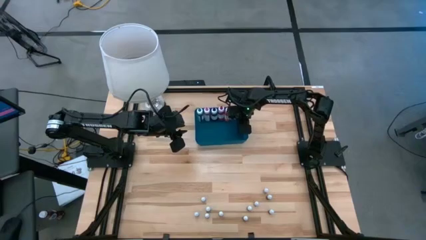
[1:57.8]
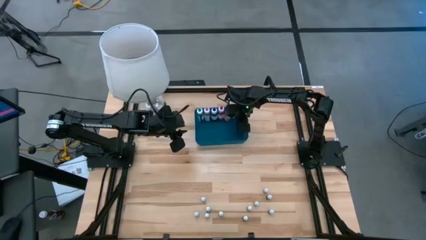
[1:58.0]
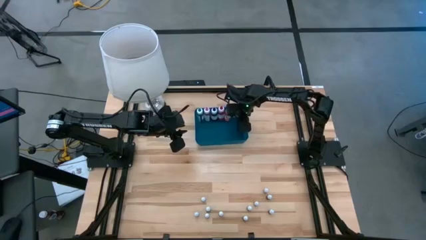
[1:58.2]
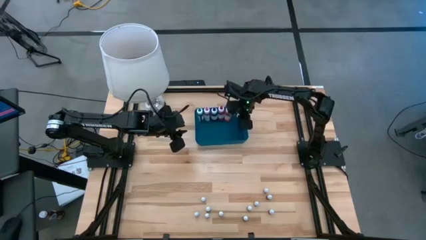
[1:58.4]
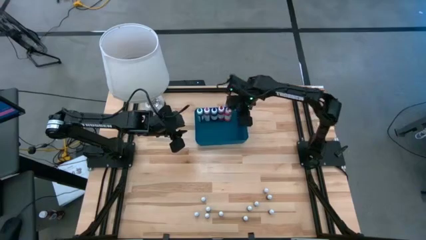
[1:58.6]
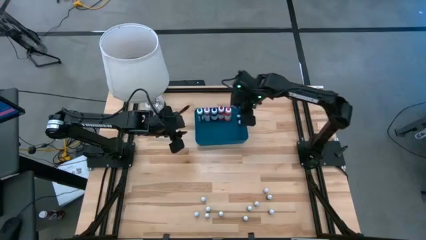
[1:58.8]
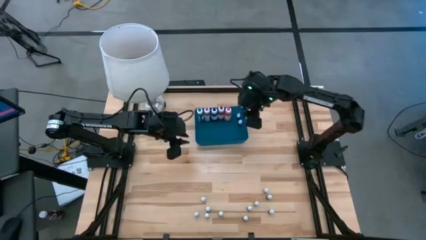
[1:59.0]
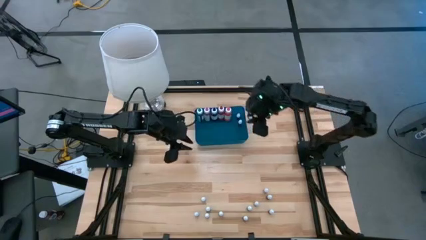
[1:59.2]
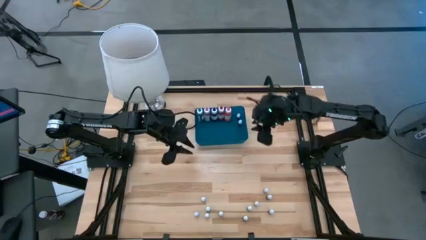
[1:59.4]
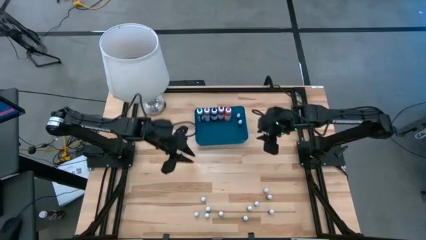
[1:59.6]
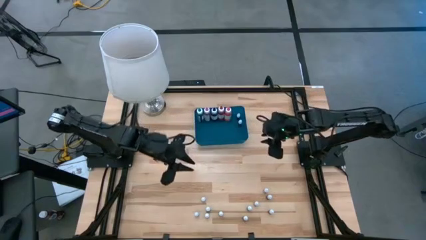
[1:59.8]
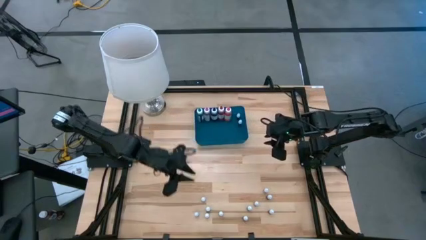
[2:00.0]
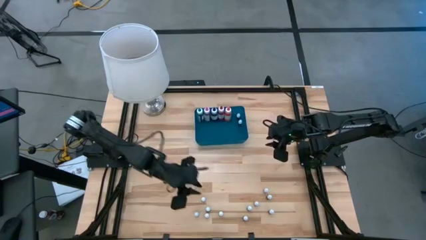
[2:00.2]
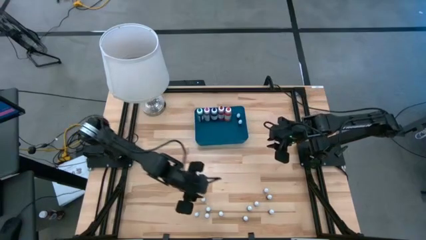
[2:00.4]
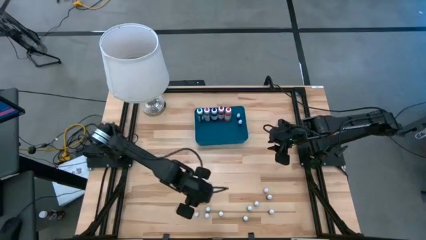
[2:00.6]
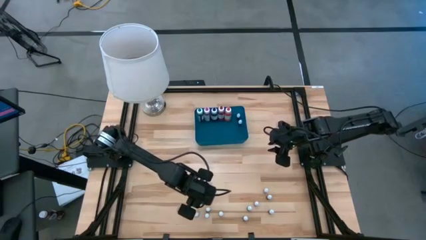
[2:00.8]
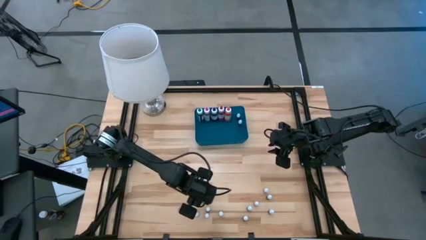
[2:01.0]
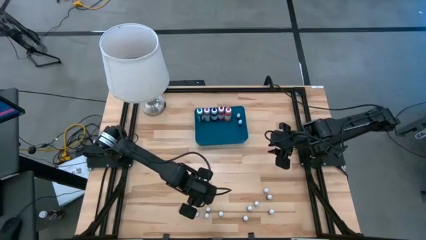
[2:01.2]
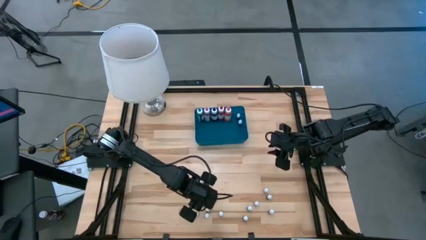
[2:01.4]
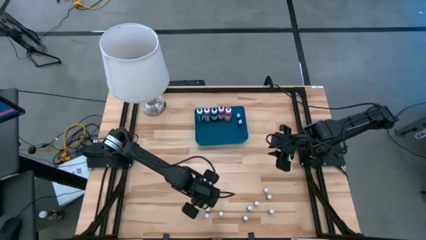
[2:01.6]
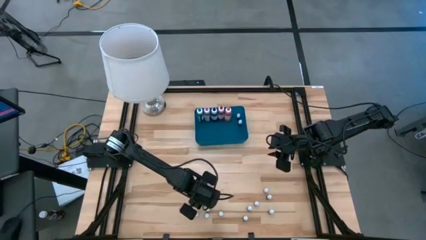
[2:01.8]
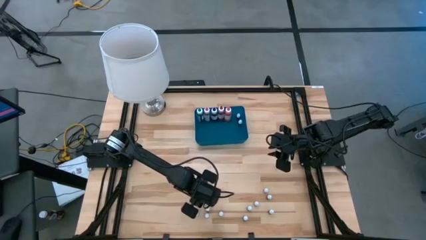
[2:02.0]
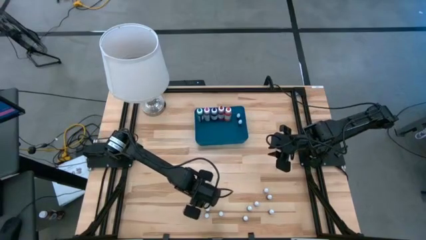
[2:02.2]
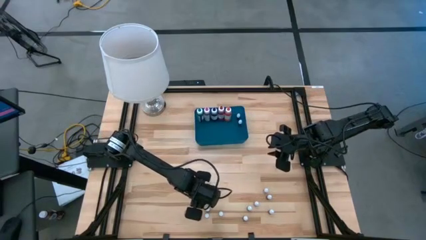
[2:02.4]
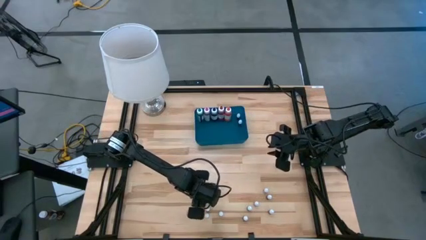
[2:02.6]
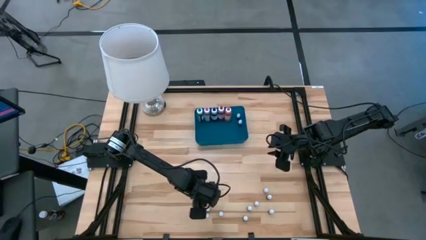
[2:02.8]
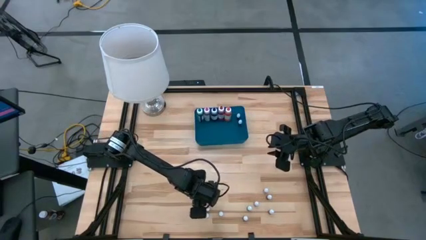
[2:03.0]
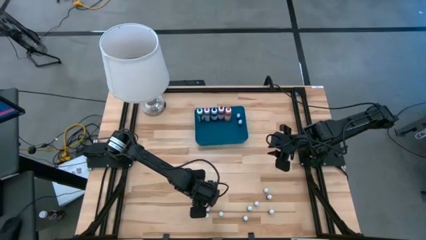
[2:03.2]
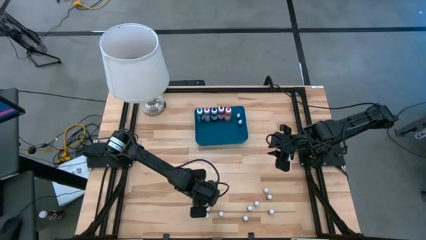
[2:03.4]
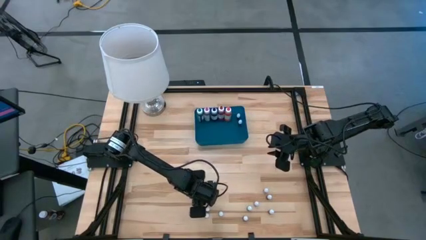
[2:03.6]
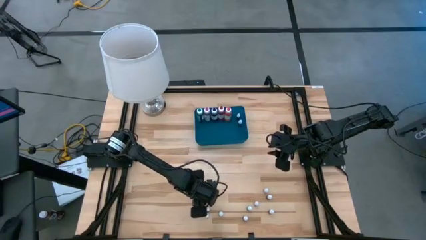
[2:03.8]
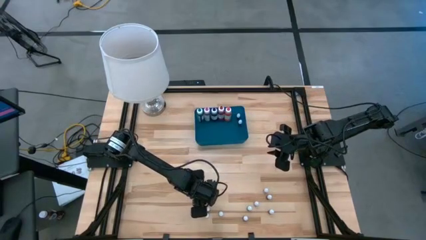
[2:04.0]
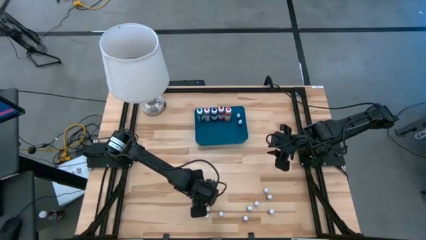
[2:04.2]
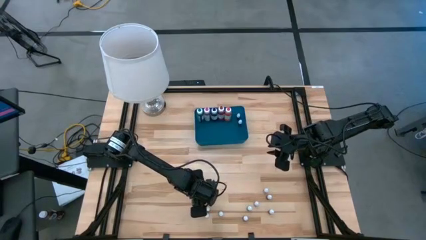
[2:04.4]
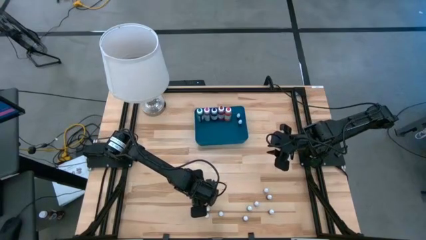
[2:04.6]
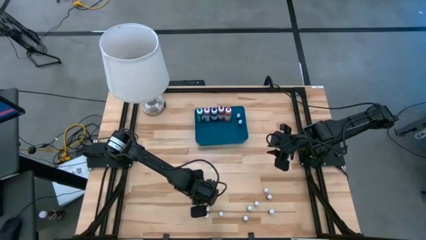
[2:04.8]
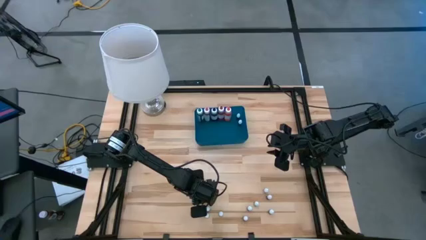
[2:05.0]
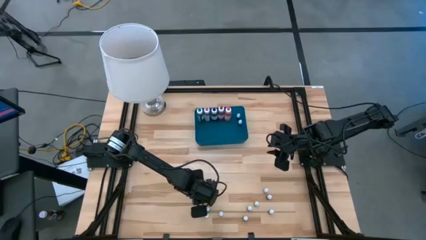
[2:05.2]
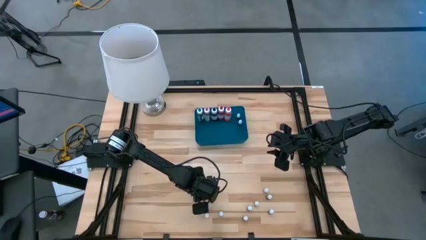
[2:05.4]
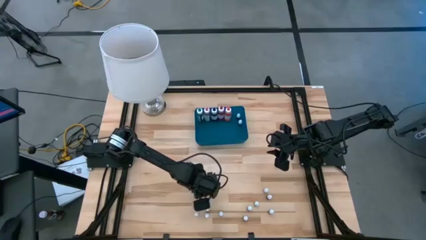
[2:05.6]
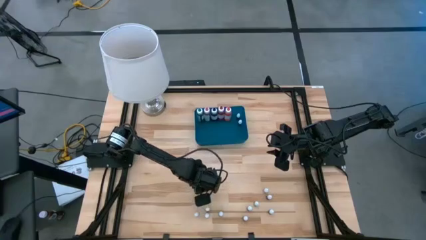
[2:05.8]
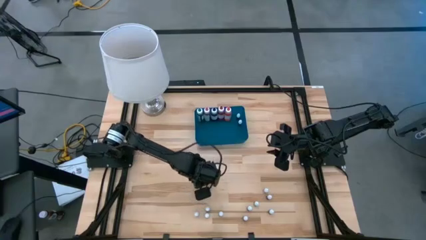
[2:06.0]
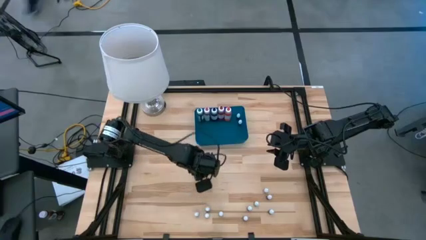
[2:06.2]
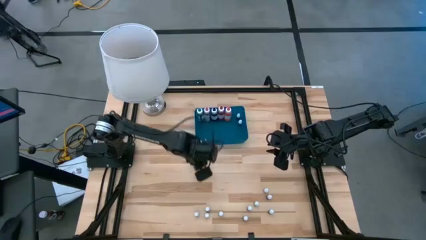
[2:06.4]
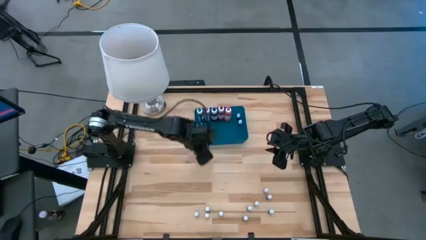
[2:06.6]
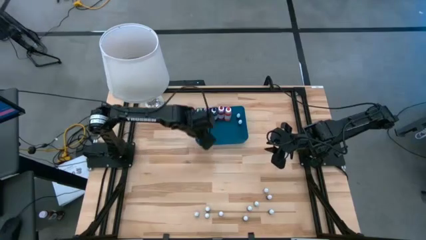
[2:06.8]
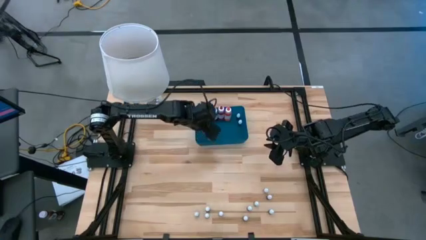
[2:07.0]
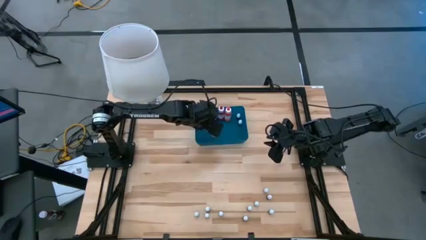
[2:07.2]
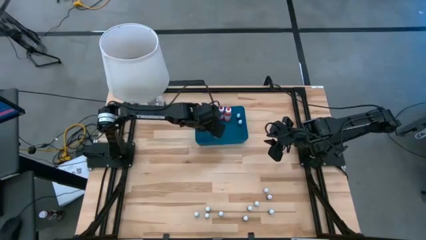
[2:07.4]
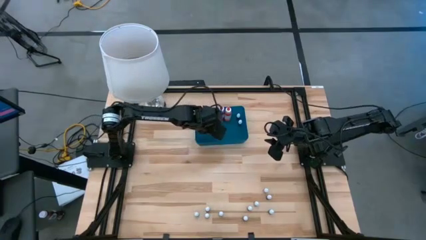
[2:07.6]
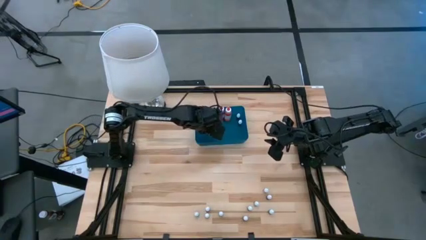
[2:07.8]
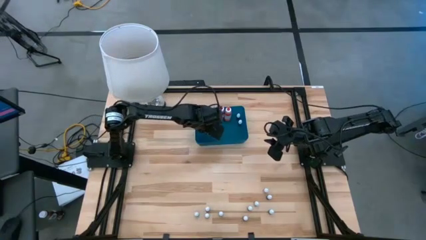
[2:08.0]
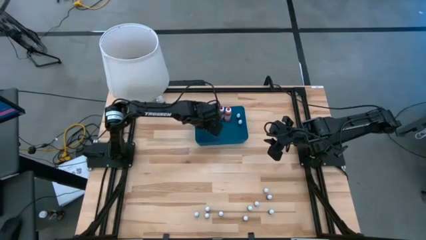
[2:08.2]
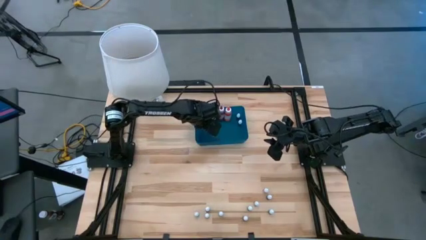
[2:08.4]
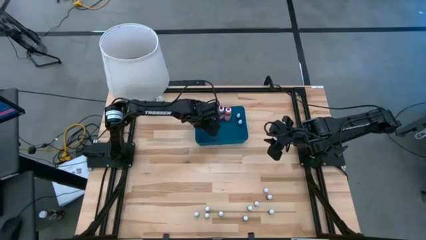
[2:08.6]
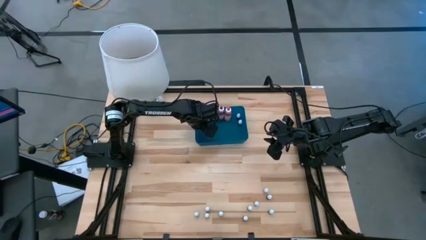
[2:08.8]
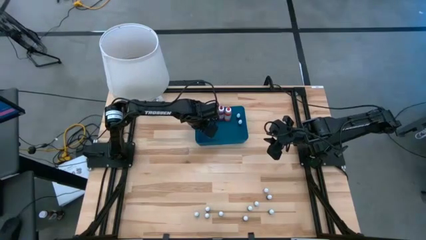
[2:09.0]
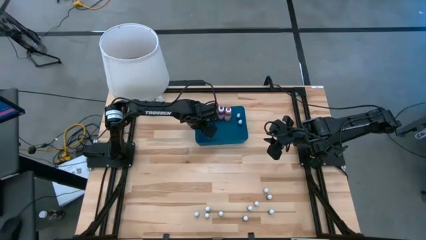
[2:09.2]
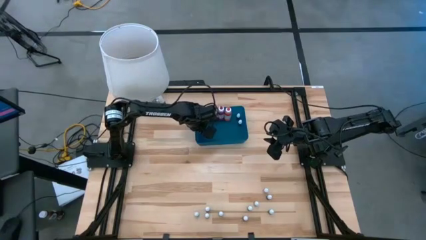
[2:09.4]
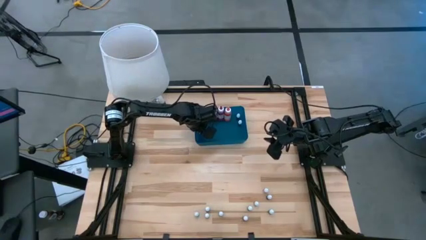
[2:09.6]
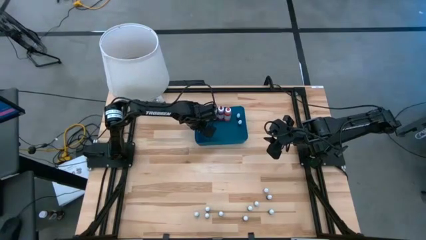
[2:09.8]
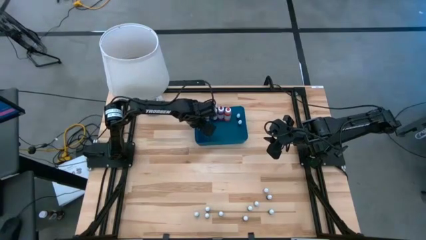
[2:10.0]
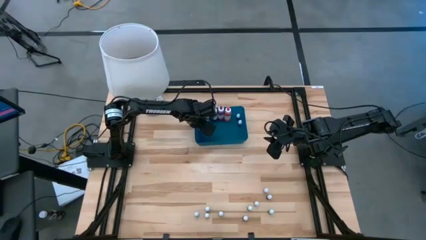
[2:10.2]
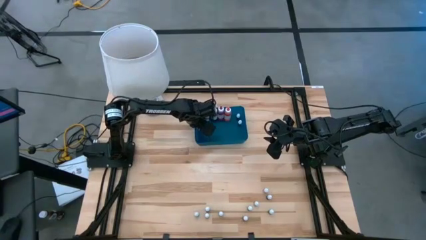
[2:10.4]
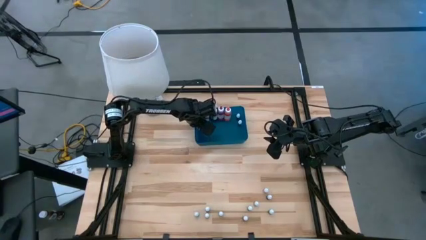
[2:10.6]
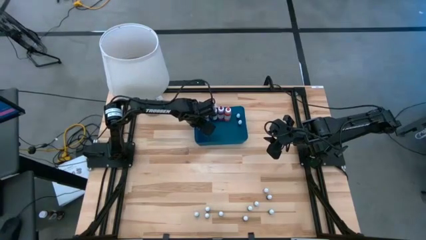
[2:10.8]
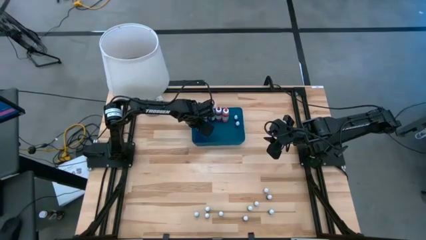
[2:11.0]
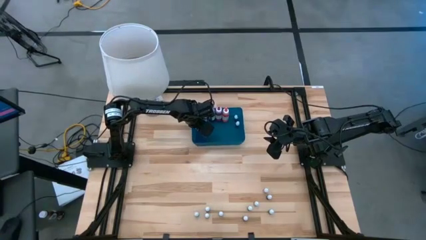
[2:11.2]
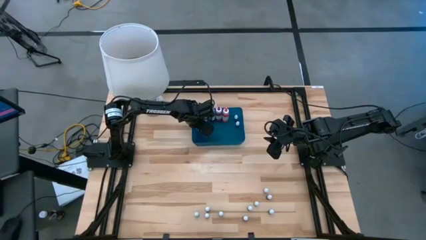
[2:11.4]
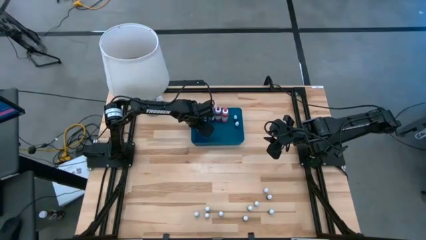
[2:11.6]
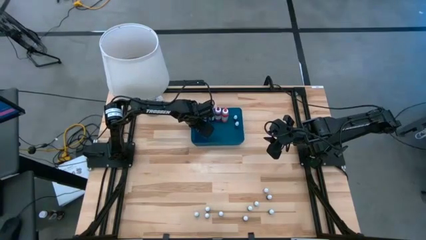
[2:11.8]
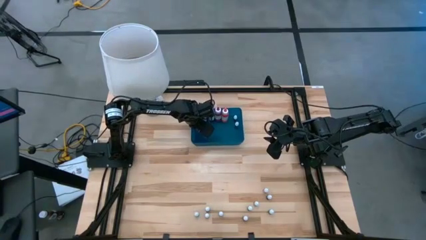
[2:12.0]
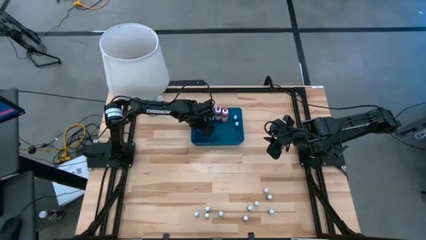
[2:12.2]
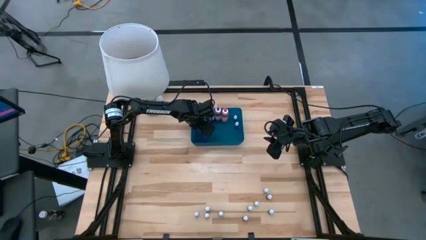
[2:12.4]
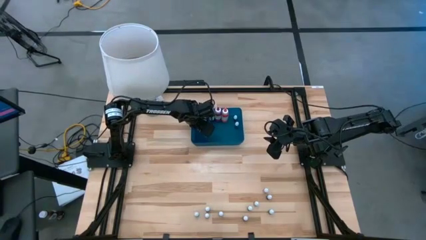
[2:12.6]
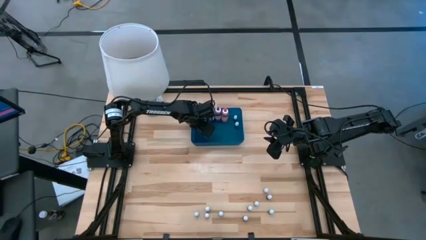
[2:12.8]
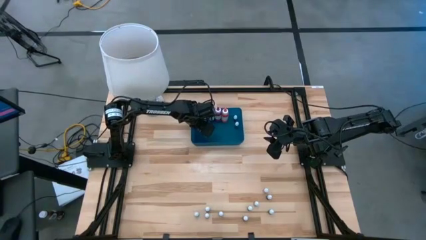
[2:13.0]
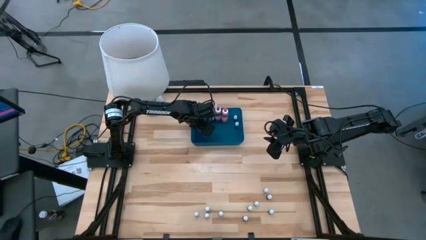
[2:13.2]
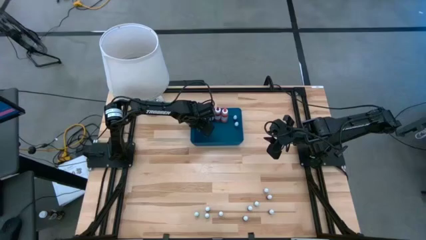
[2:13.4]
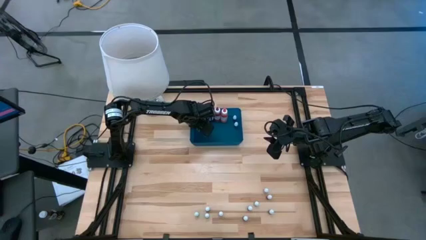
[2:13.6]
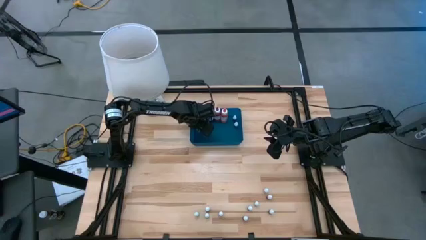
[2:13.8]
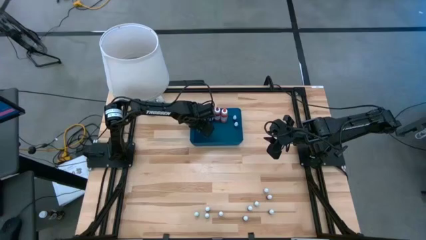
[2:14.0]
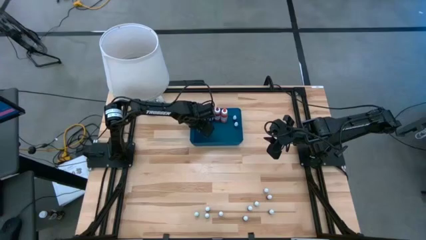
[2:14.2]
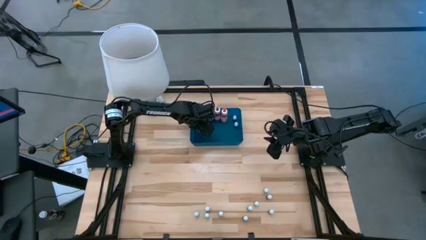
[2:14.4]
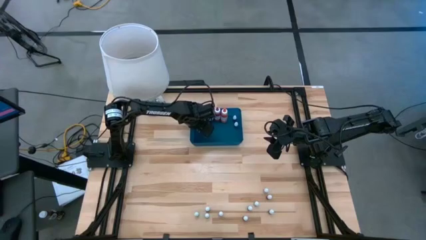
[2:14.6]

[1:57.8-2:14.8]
Task: Pick & Place food coloring
Put the small black food coloring bottle into the bin
